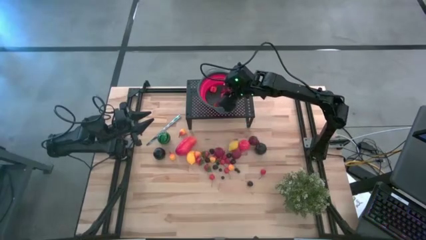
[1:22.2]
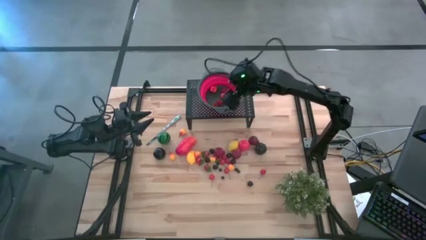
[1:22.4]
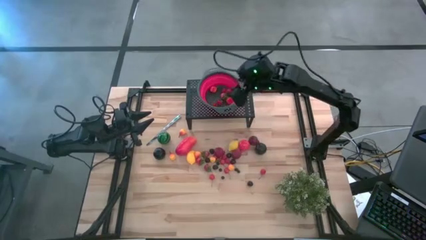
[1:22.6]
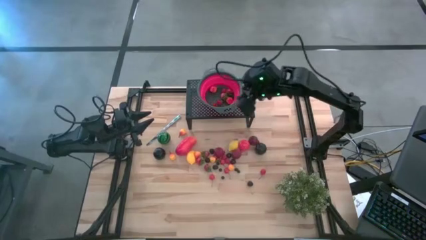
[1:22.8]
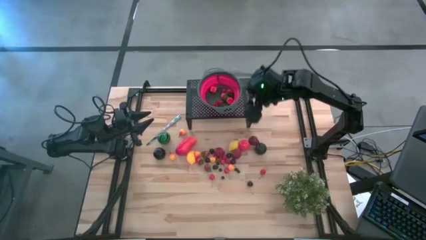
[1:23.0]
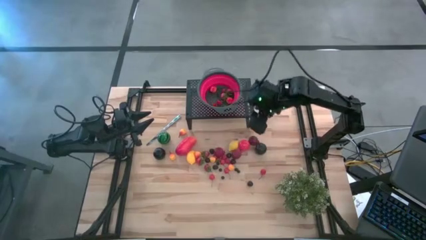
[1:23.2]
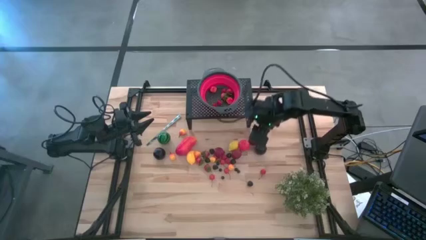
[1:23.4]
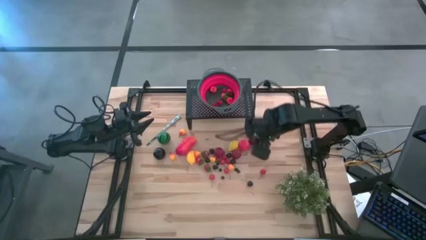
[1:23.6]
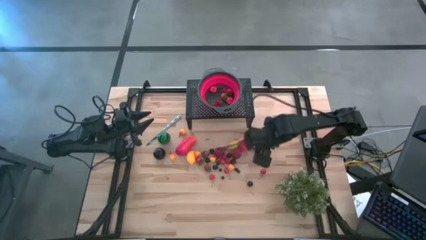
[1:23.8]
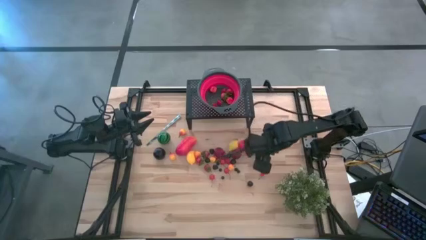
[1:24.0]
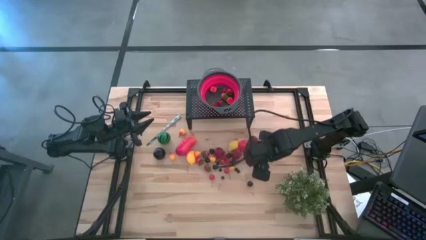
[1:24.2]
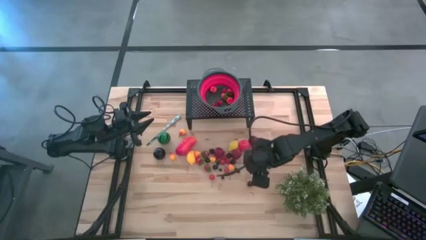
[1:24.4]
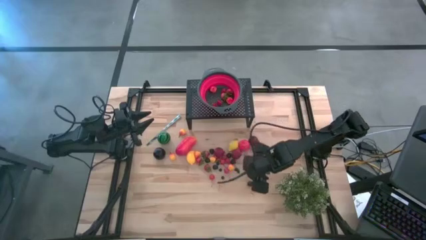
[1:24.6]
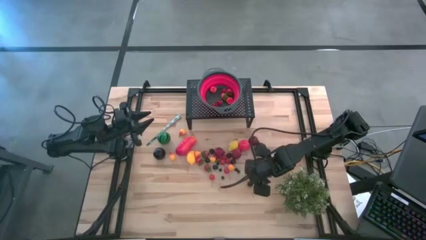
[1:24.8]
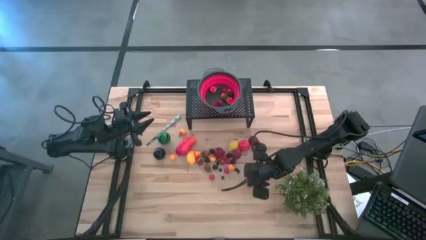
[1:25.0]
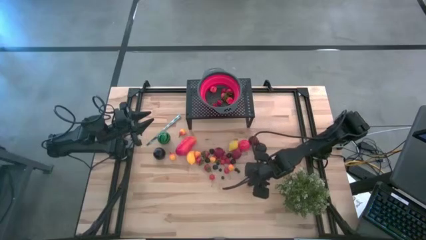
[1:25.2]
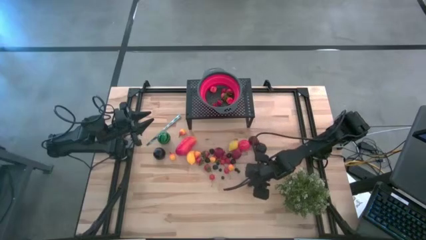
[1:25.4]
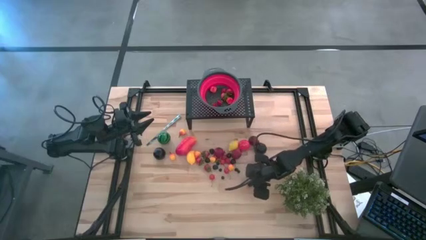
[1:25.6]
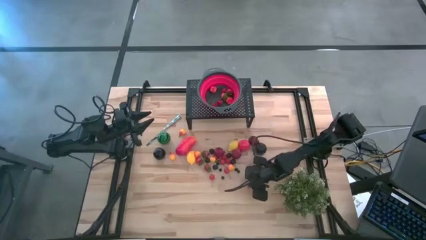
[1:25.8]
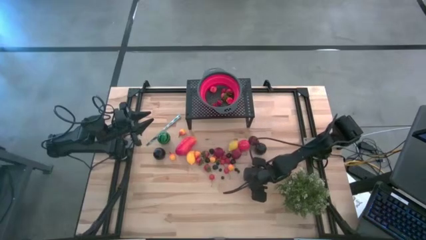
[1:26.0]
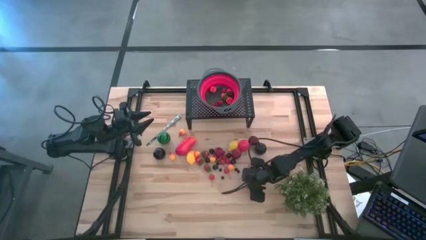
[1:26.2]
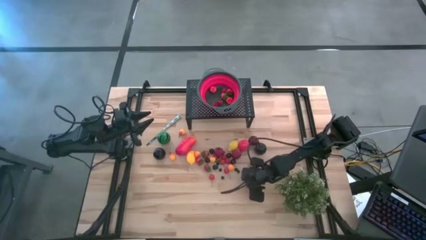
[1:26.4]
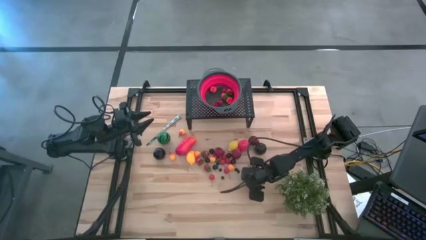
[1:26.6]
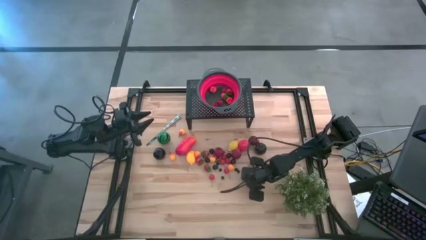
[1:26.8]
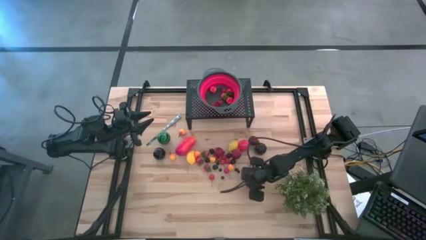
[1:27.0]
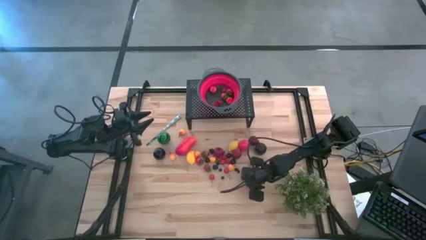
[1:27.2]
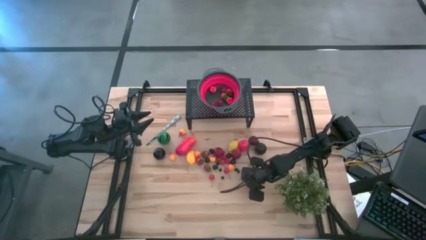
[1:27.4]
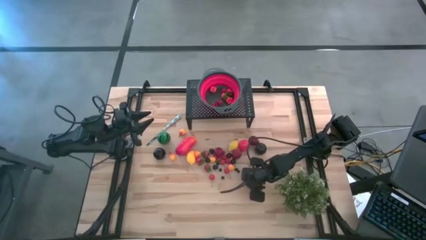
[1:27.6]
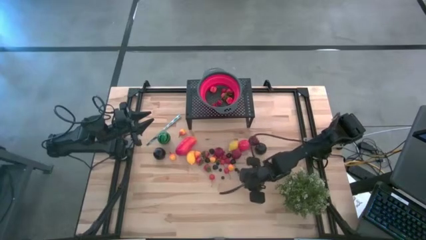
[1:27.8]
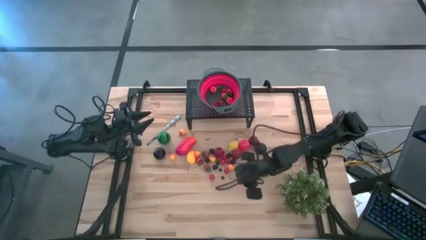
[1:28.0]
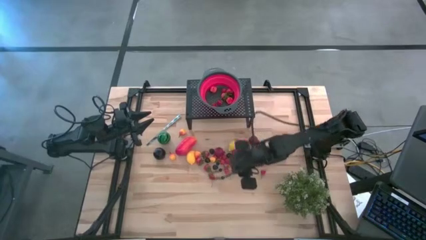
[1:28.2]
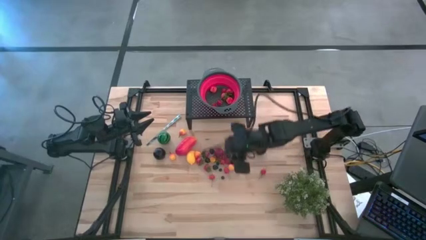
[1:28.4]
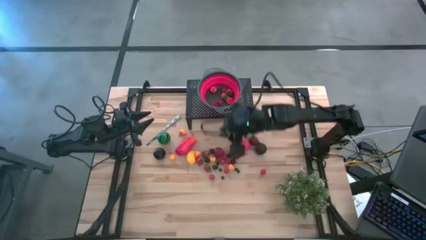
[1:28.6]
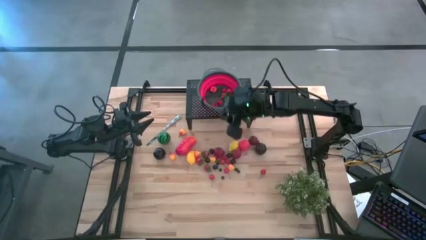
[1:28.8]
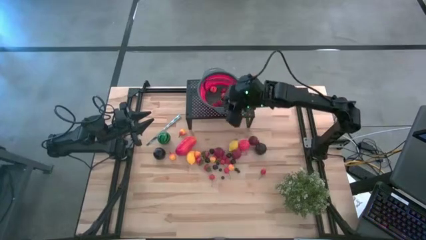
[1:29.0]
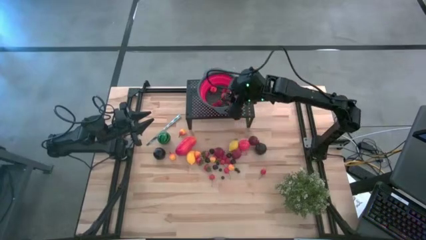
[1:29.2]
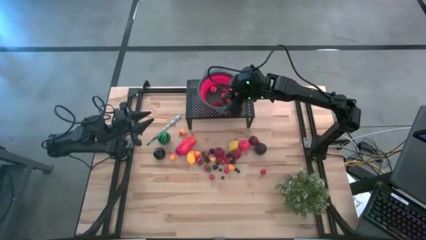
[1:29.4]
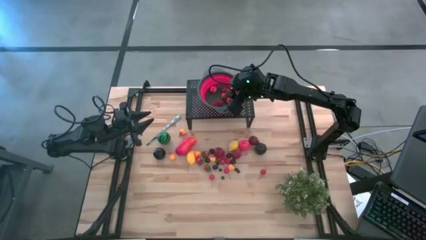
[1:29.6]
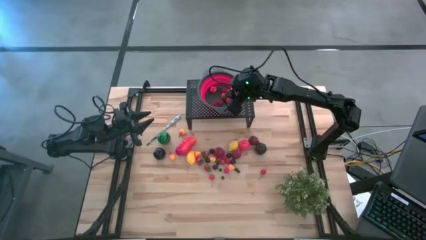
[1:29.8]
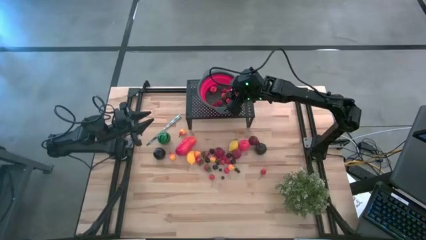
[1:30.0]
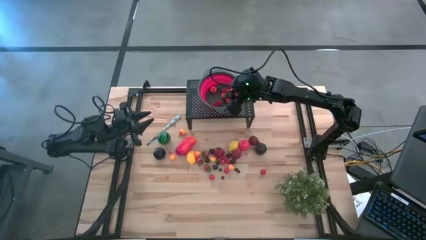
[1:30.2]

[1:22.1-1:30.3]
Task: Pick & Place Fruit
Put the black cherry in the red colander on the shelf

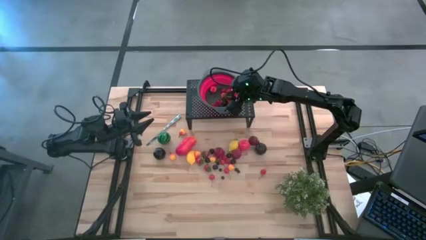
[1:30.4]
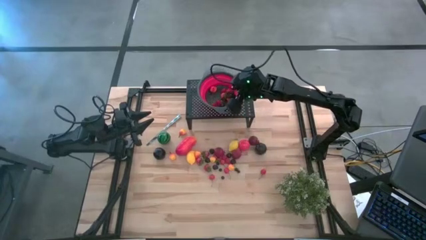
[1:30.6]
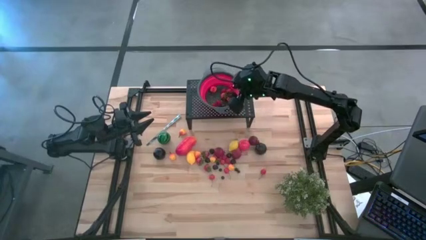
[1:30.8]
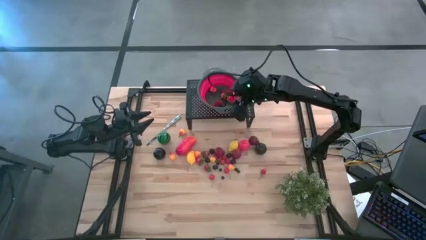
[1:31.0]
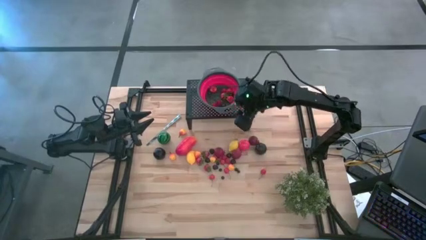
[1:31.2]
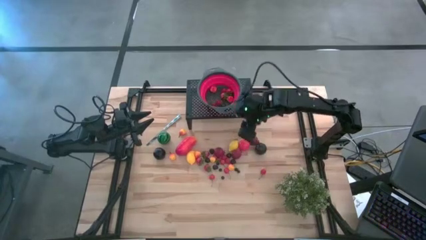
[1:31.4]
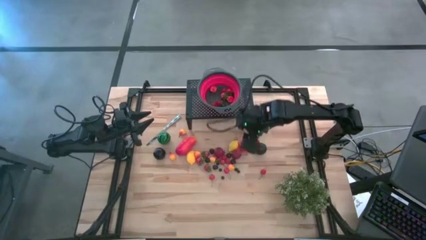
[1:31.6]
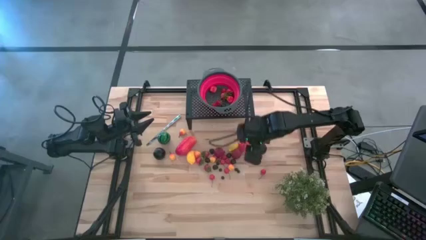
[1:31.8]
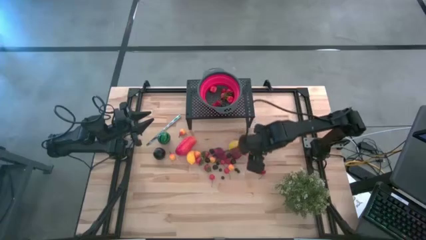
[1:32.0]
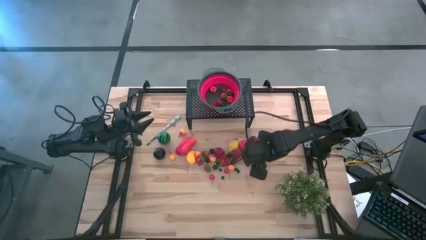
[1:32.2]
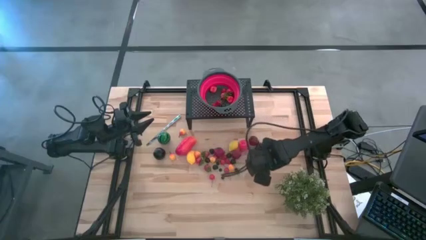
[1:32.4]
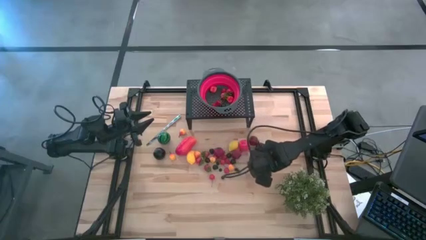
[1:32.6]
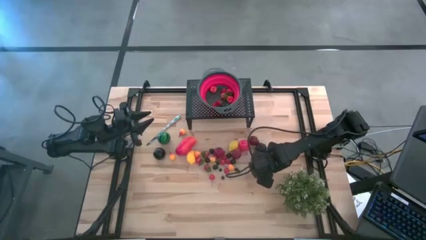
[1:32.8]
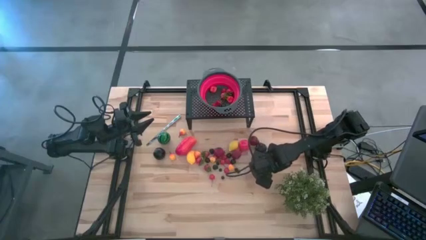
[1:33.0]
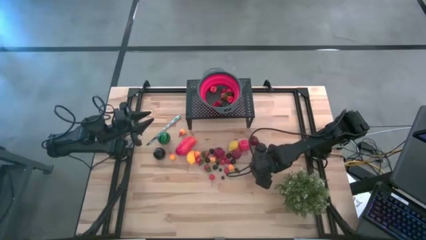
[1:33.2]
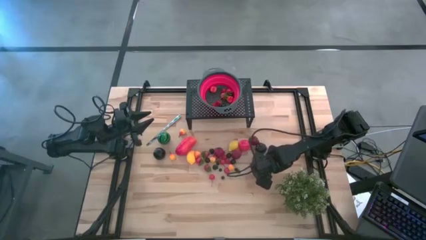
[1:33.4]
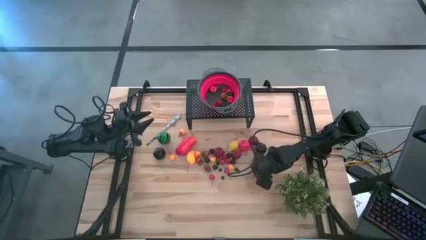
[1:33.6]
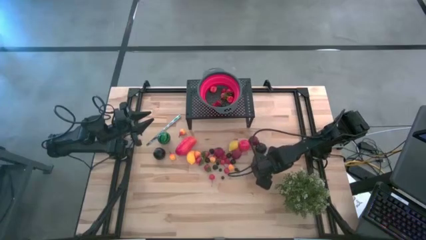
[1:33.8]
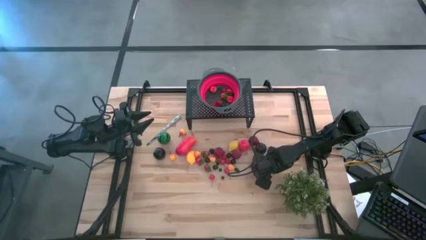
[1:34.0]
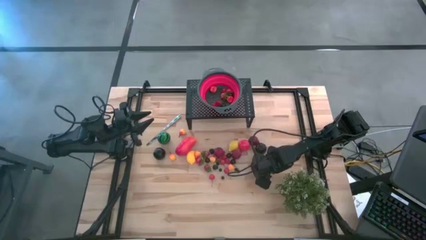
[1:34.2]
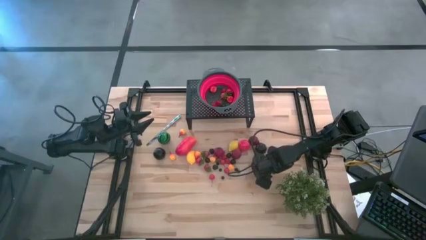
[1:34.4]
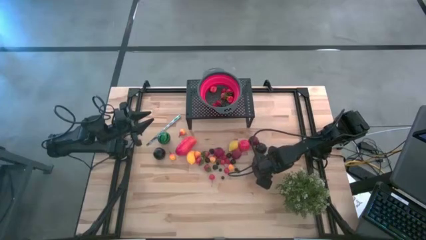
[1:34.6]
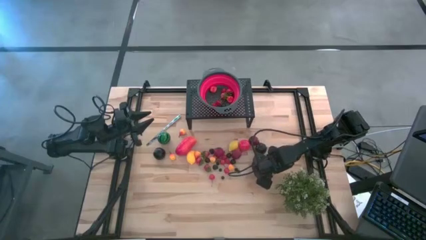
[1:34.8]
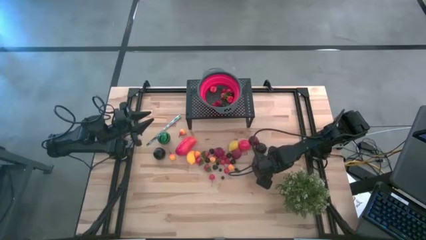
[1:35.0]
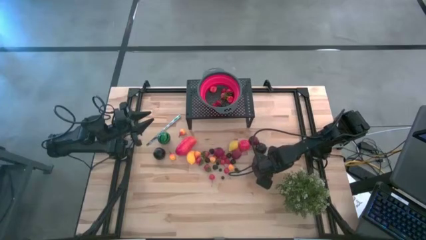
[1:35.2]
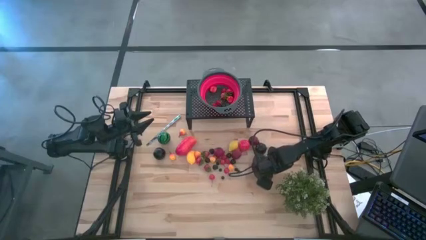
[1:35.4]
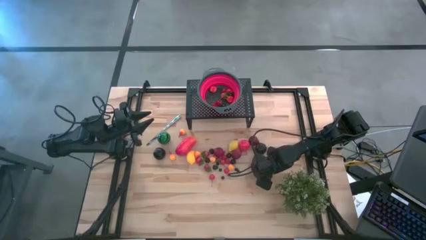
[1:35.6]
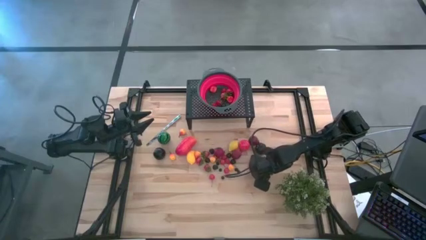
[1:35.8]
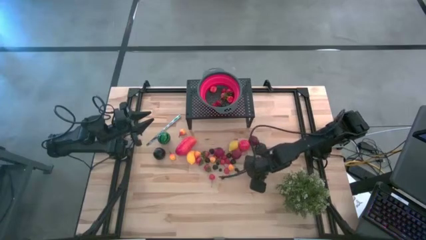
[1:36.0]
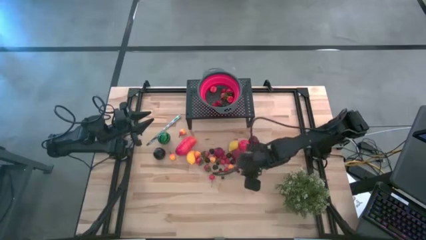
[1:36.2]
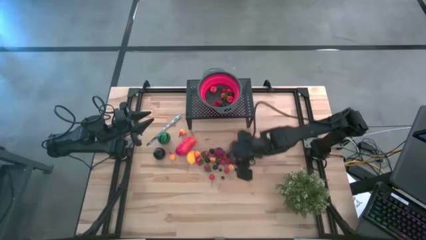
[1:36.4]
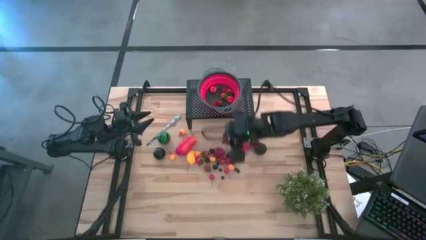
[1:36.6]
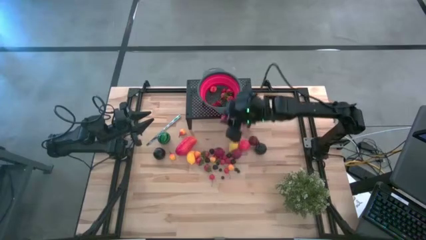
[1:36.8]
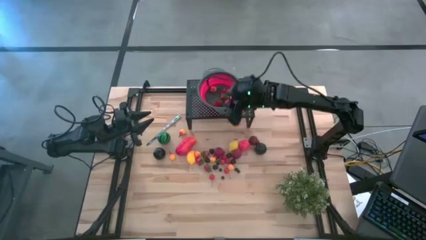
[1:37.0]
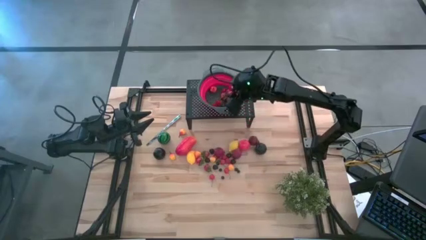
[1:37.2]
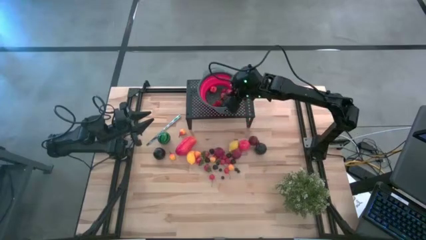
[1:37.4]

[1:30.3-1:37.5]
Put the red cherry in the red colander on the shelf

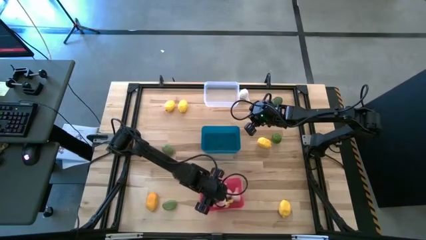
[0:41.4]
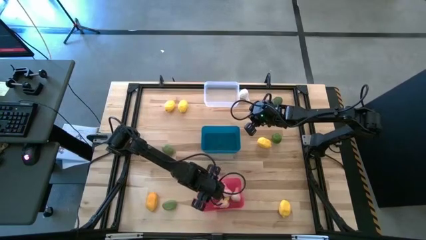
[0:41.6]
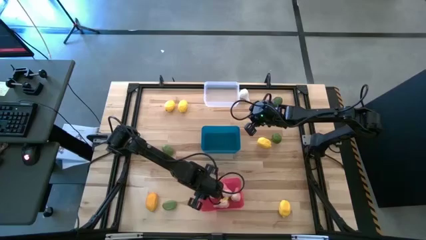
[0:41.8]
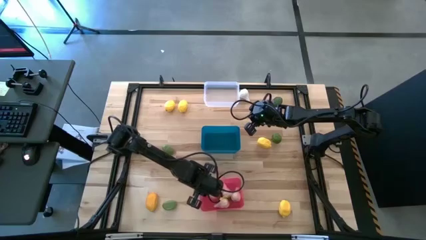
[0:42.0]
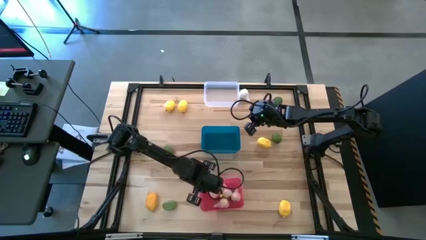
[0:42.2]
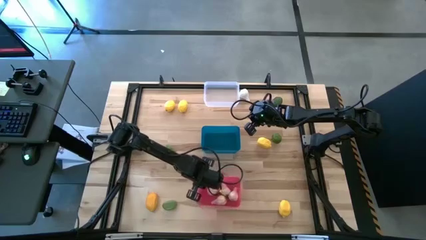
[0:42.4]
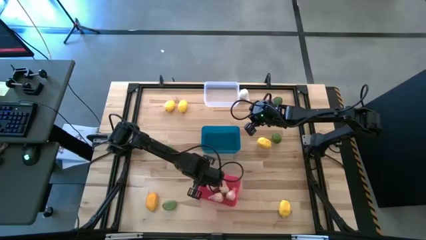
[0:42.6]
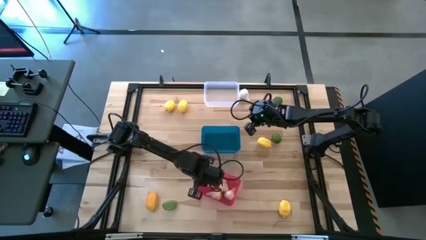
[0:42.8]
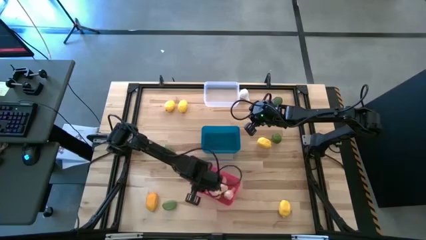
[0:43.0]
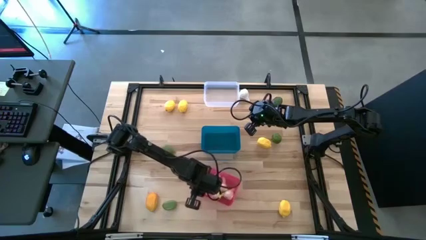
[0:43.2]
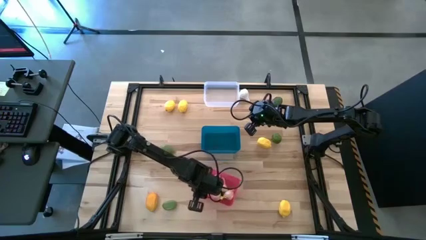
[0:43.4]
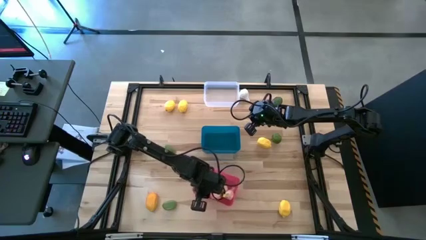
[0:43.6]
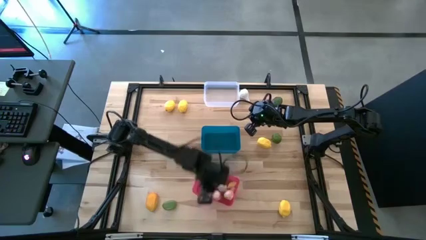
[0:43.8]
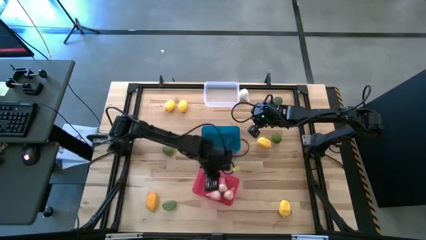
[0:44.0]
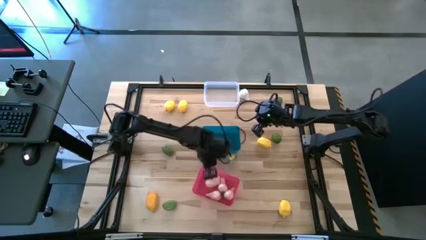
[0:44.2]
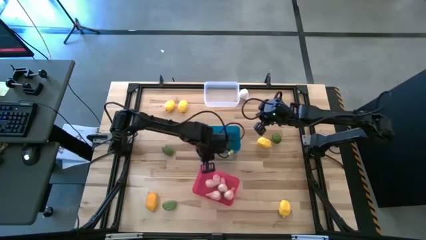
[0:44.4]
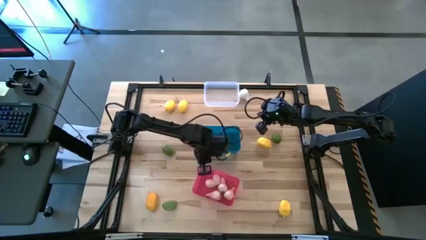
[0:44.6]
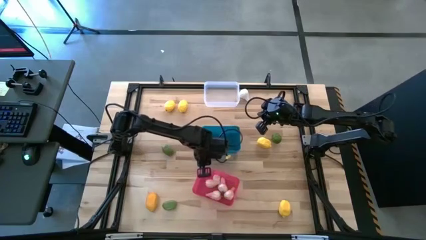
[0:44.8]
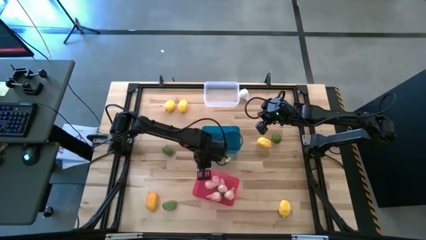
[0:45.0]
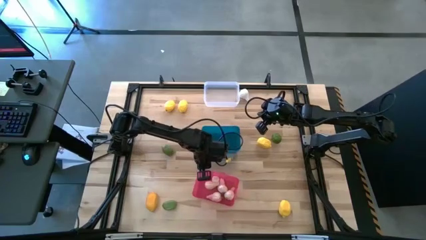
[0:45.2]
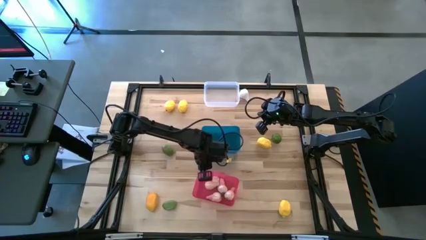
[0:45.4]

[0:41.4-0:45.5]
Task: Sort produce into baskets
Adjust the pink bin
